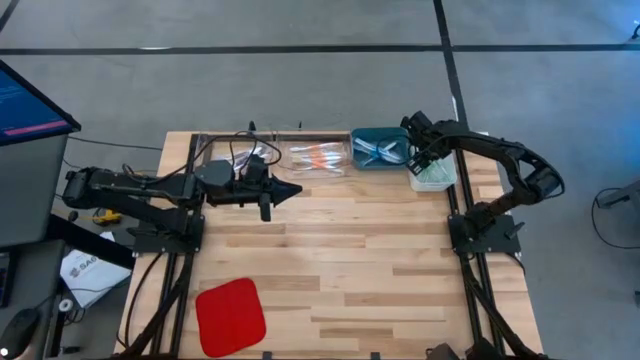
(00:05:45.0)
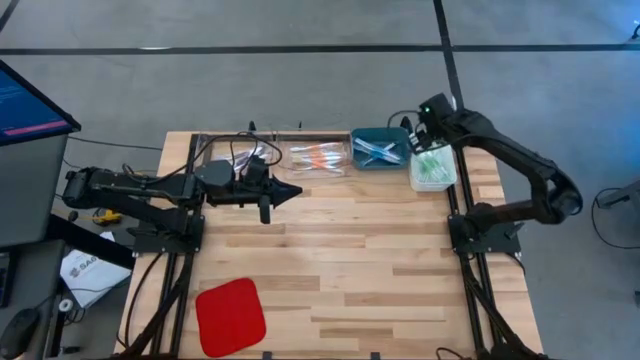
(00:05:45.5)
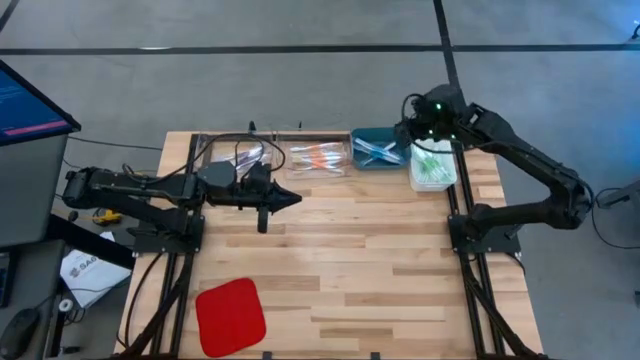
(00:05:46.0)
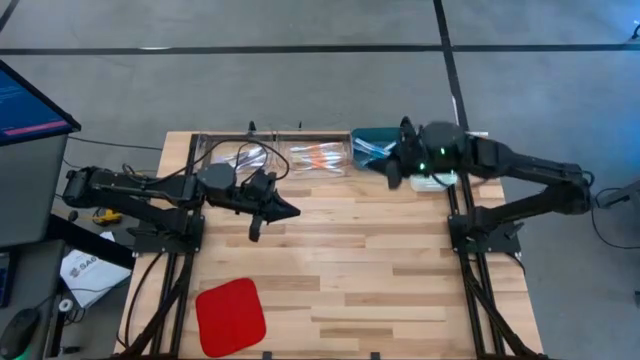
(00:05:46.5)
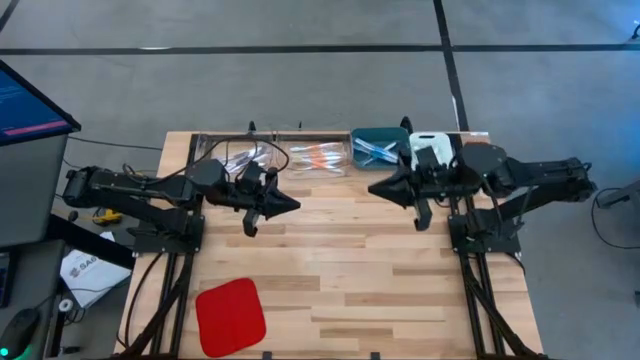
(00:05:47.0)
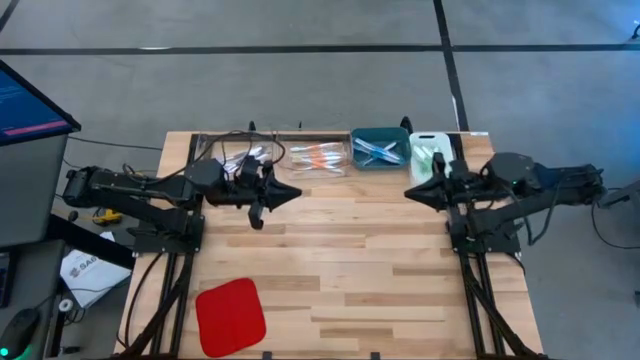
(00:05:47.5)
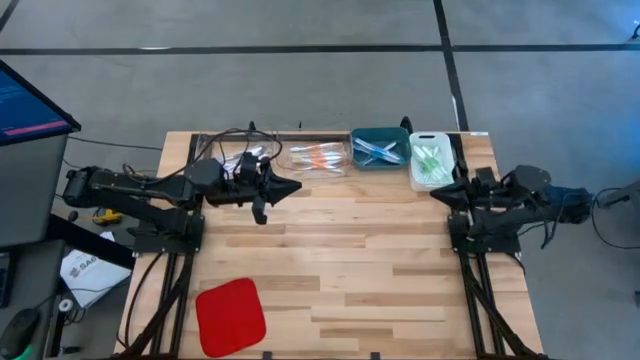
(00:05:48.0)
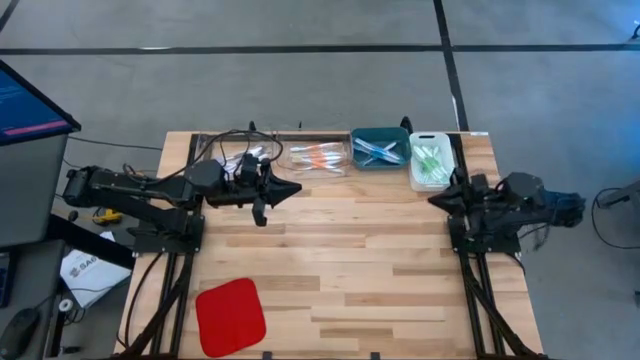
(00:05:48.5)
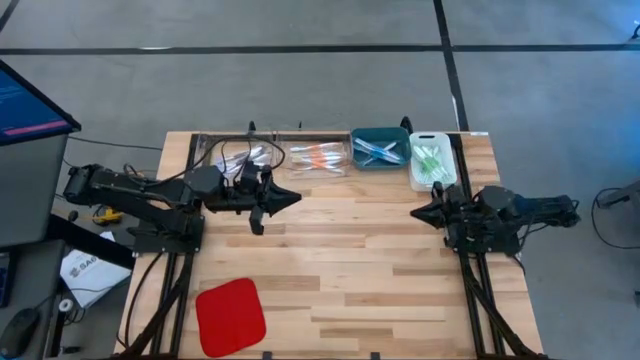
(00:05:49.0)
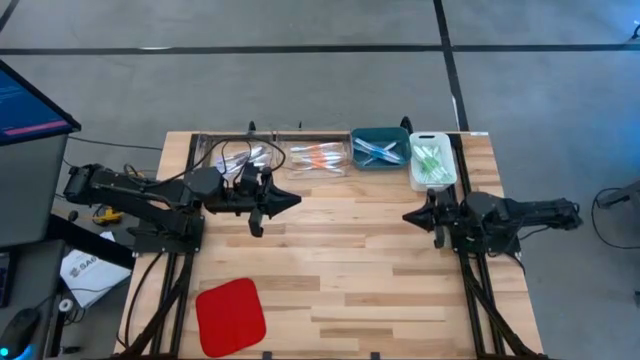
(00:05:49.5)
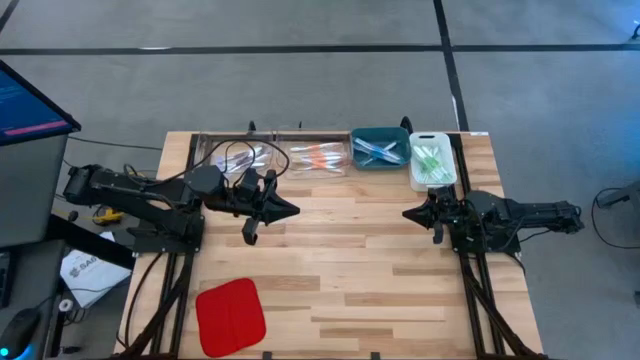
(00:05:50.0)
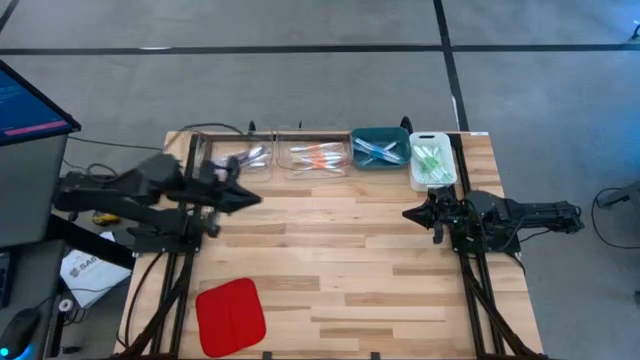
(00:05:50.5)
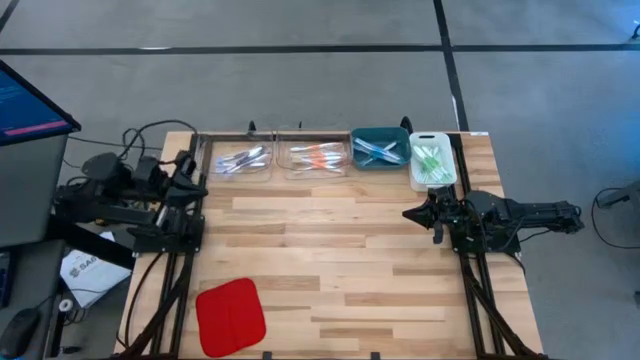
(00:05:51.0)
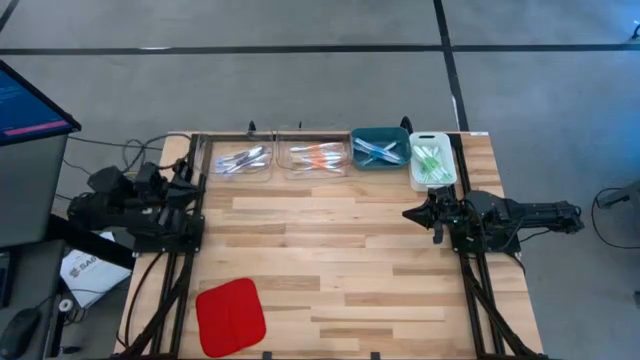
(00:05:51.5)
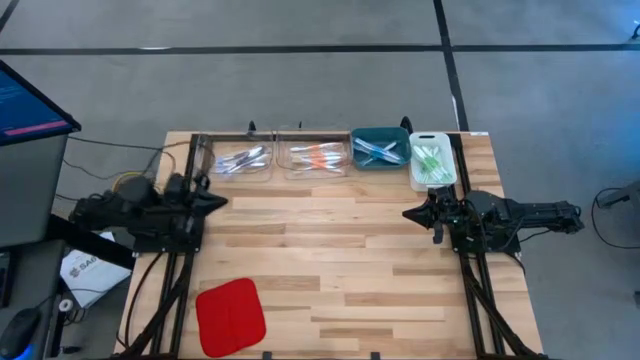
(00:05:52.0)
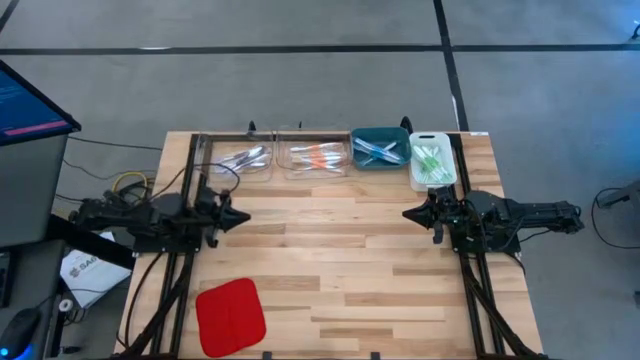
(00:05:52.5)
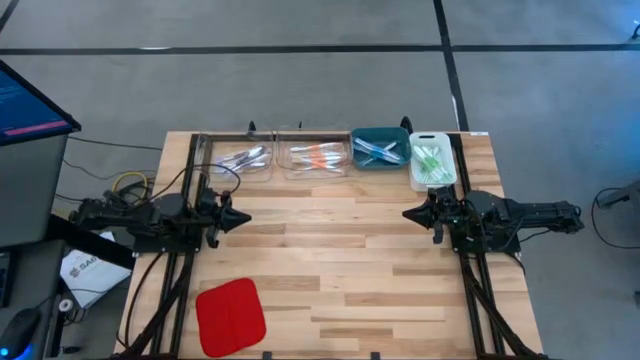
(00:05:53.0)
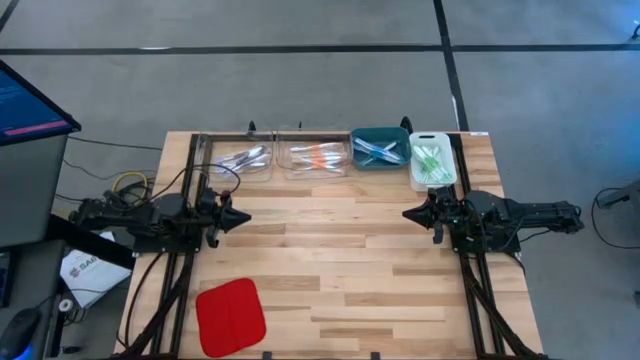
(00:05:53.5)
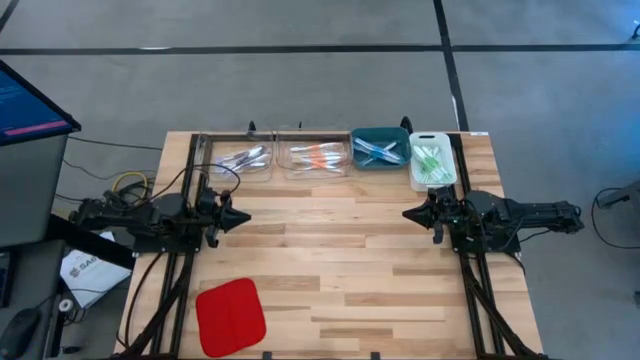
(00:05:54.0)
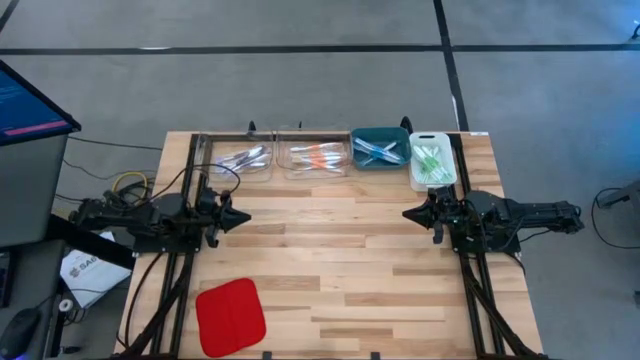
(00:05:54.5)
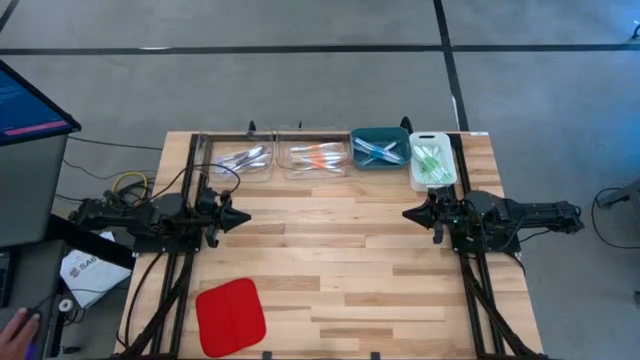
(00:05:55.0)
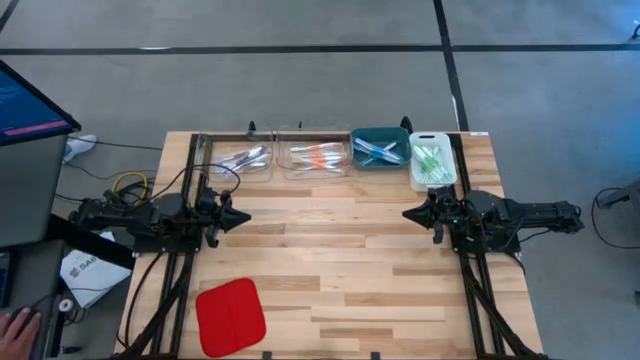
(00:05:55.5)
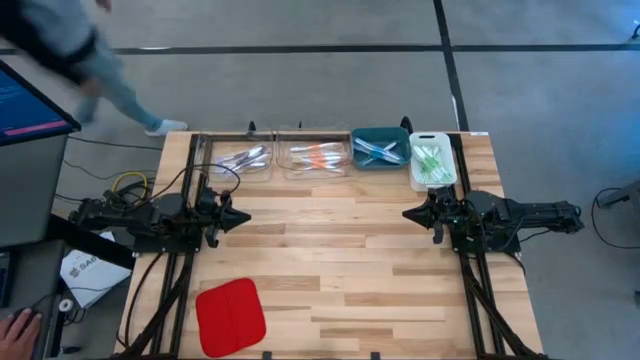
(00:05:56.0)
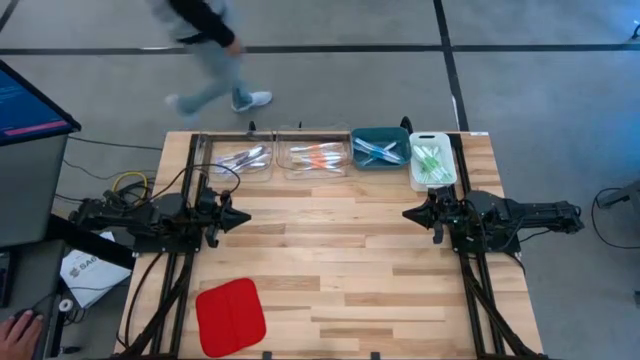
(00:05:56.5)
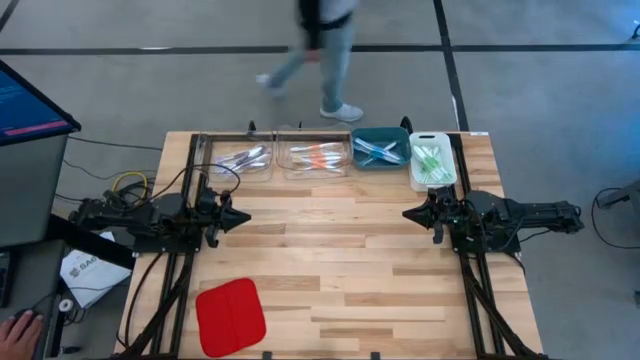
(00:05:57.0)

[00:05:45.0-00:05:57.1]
Task: Pick & Place Toothbrushes
Return to Home position

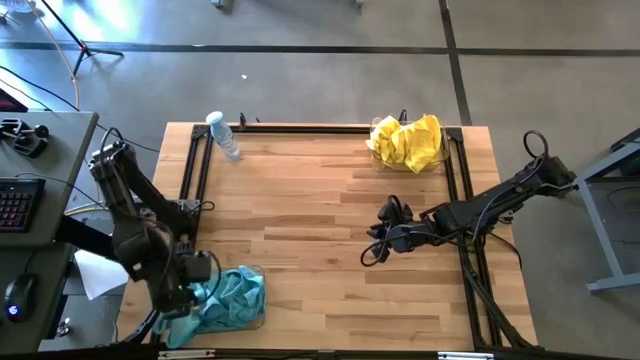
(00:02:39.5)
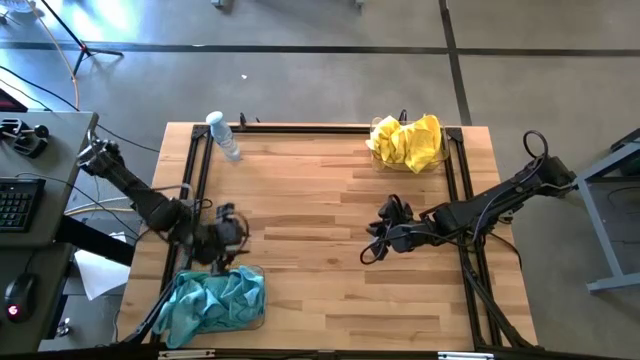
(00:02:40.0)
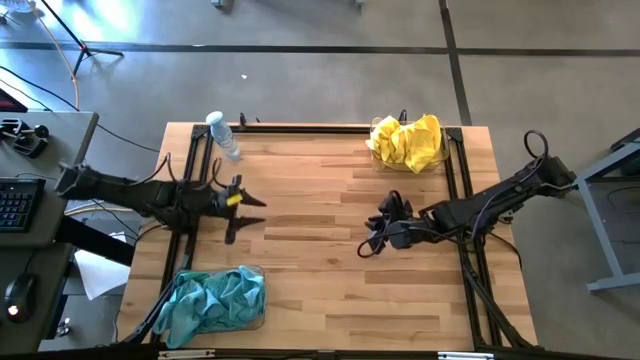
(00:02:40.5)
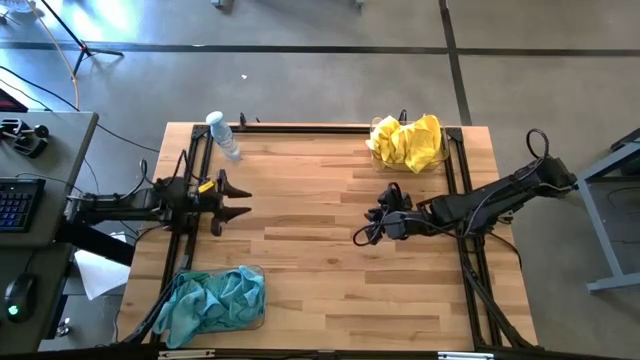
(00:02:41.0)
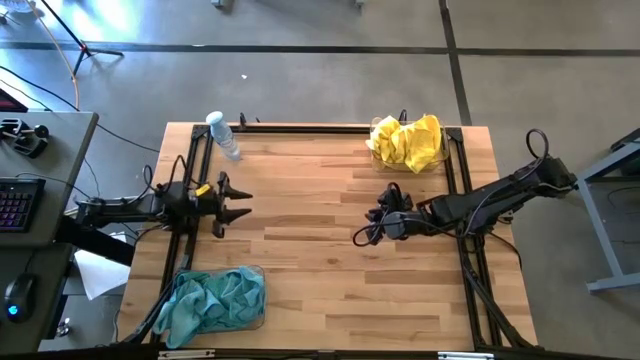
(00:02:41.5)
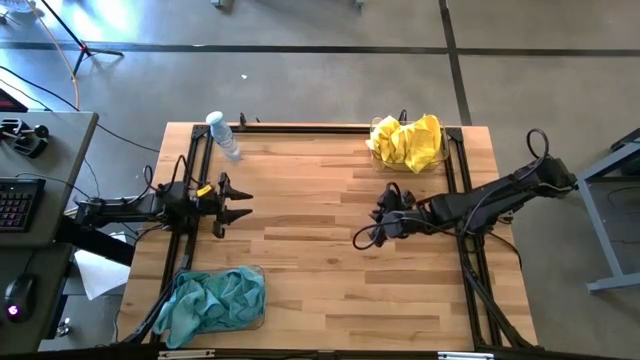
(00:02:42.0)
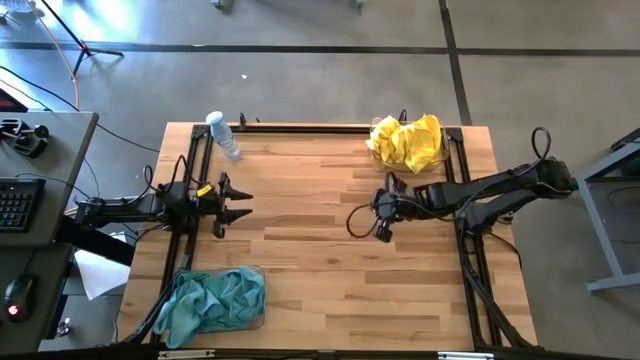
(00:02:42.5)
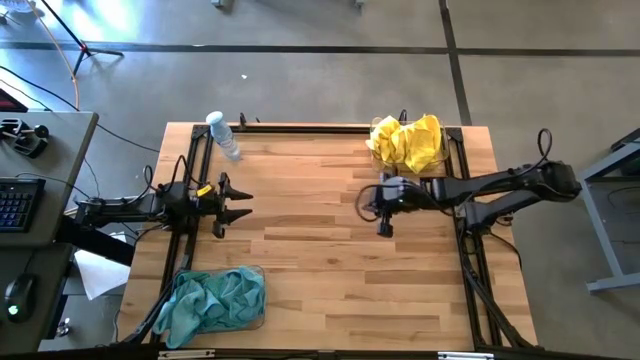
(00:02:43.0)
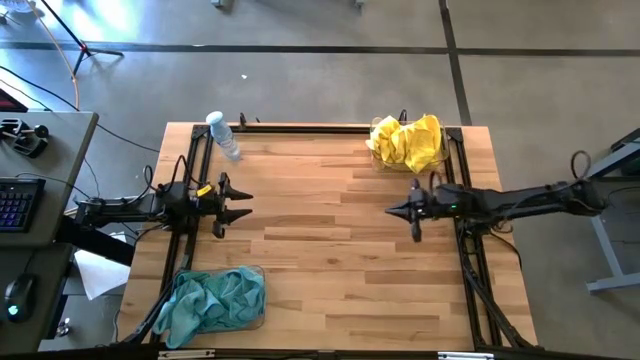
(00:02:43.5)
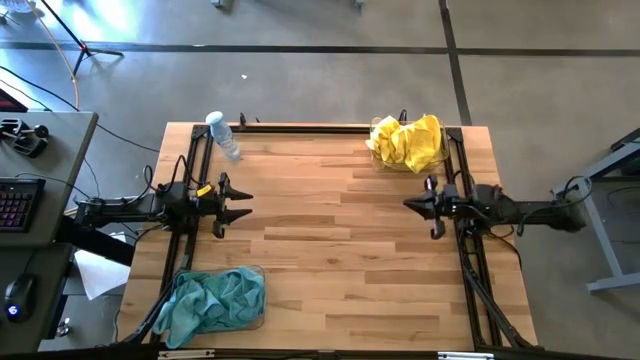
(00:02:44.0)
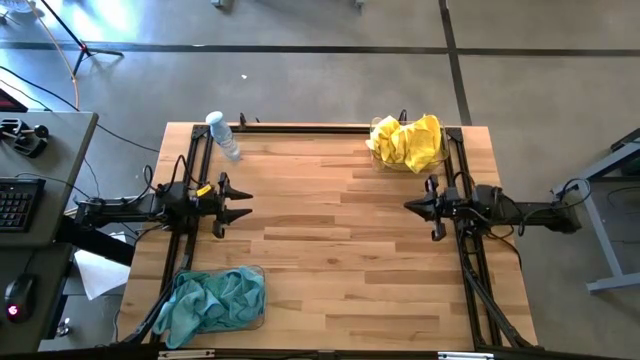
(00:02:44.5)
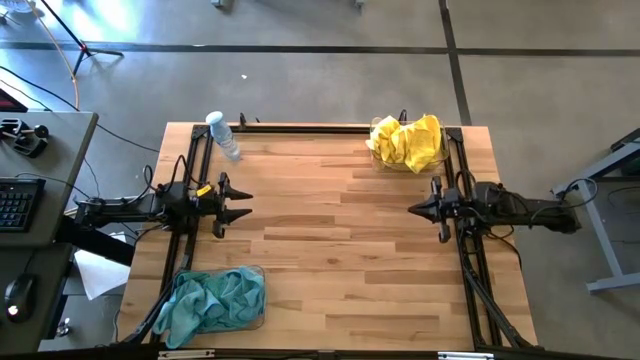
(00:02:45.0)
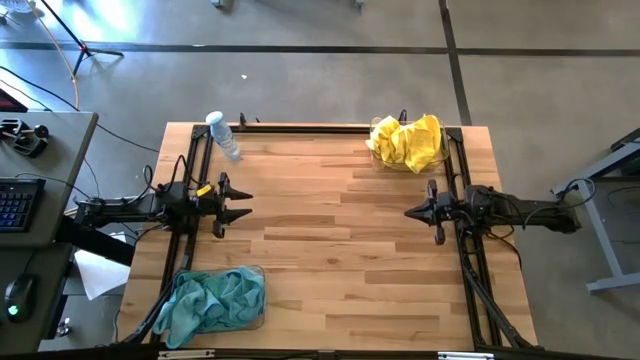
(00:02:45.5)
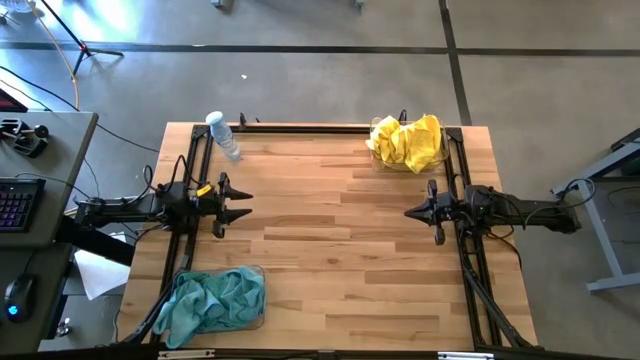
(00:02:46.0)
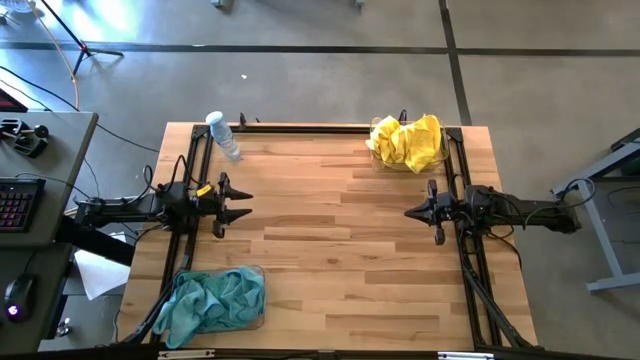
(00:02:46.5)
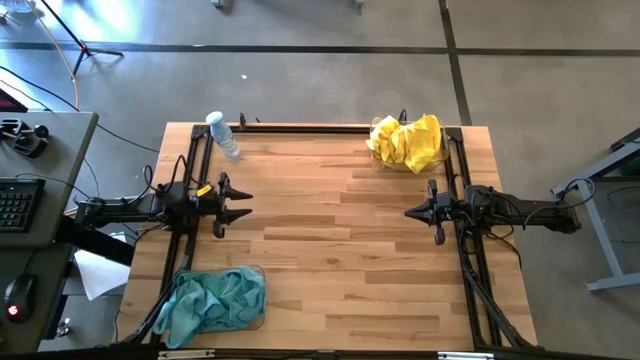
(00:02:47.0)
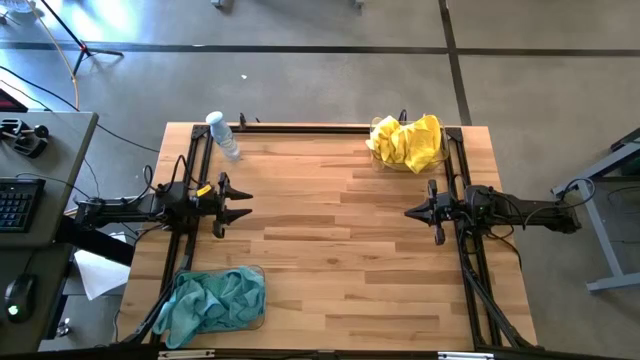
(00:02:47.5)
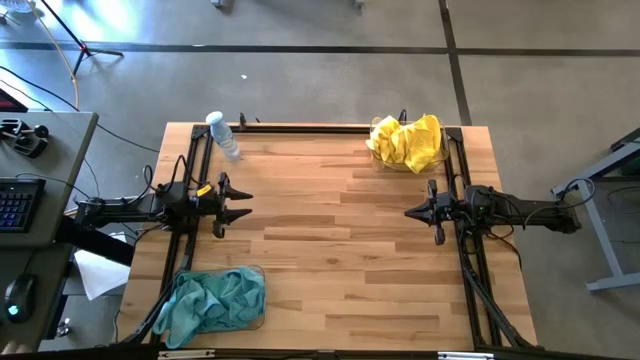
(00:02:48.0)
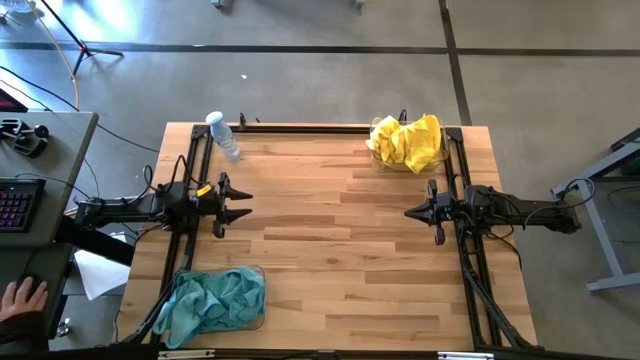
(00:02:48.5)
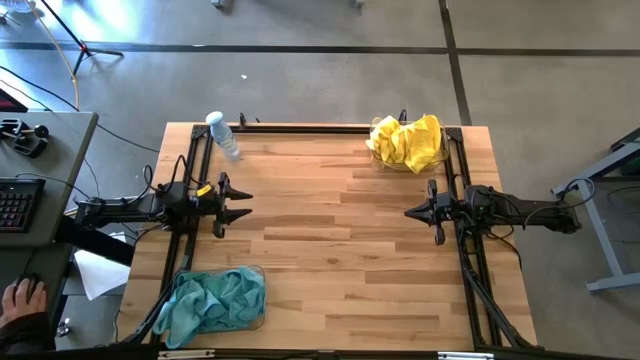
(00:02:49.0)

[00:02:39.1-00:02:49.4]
Task: Sort microfiber towel by color & place in baskets
Return to Home Position
